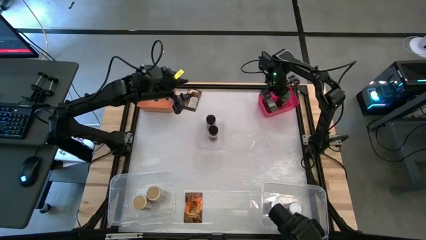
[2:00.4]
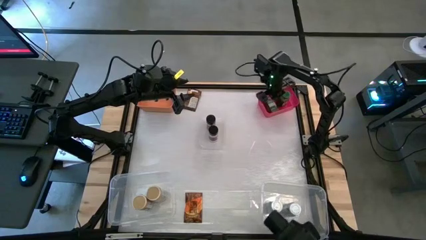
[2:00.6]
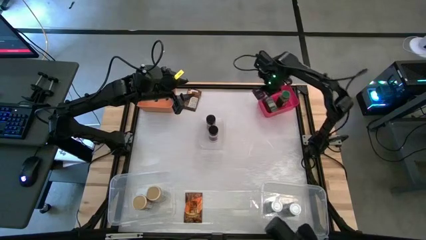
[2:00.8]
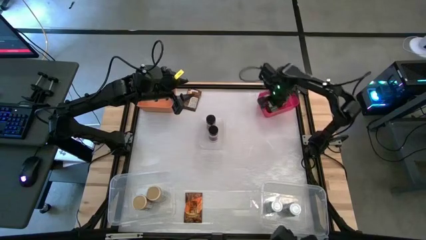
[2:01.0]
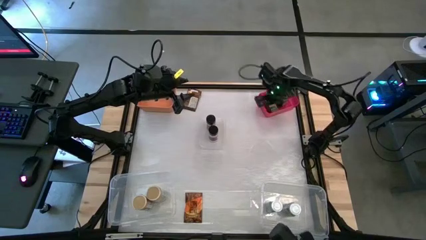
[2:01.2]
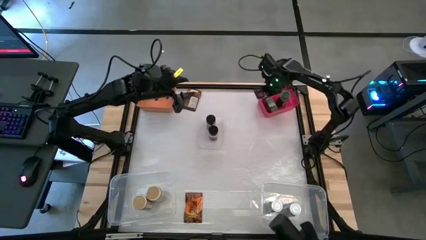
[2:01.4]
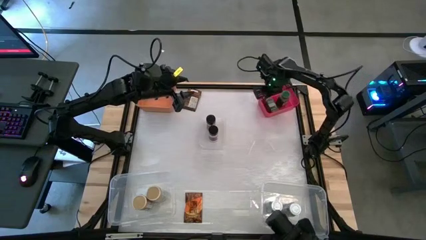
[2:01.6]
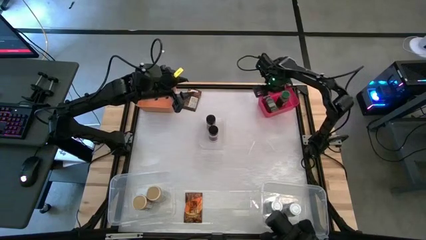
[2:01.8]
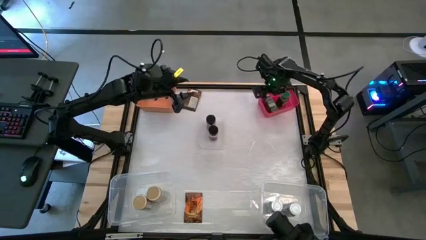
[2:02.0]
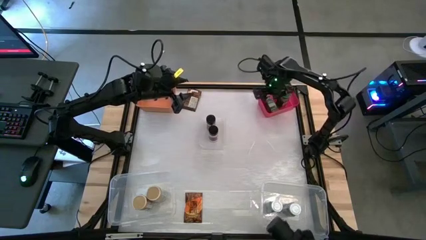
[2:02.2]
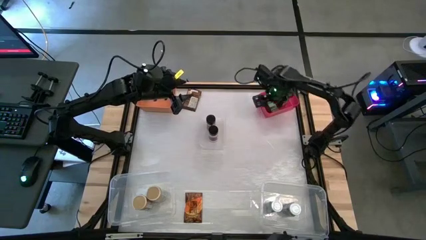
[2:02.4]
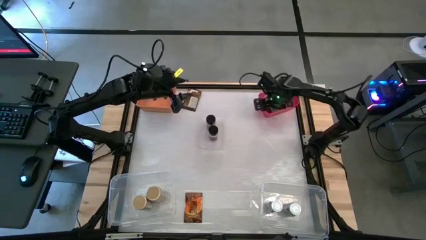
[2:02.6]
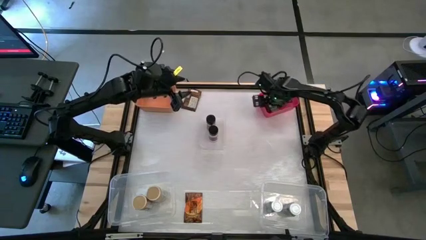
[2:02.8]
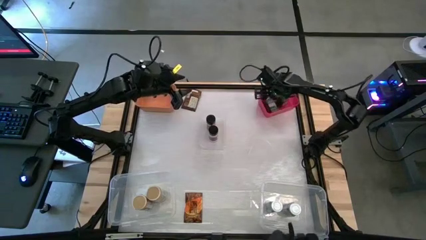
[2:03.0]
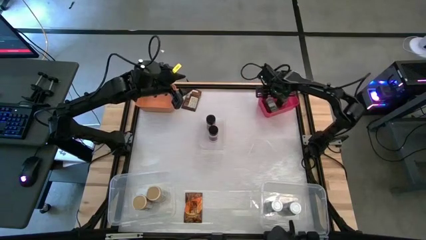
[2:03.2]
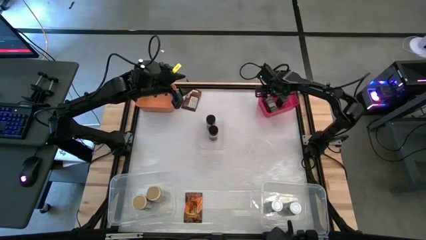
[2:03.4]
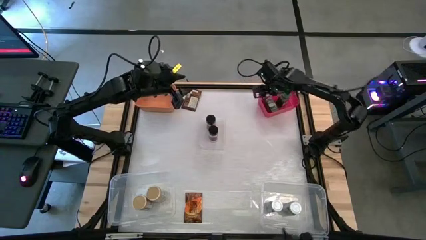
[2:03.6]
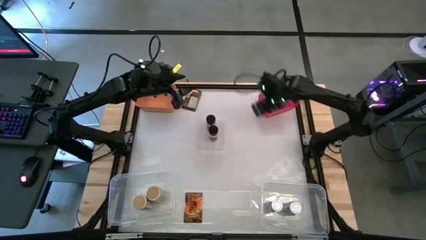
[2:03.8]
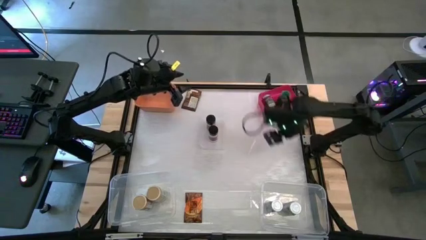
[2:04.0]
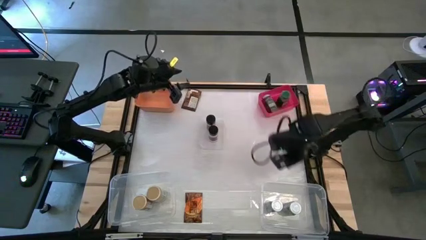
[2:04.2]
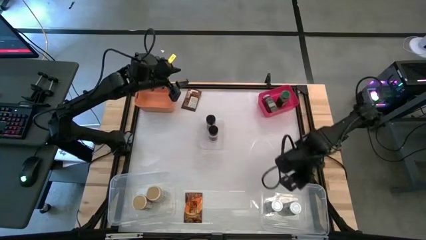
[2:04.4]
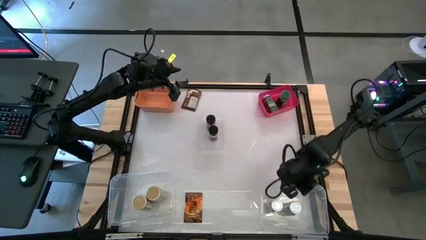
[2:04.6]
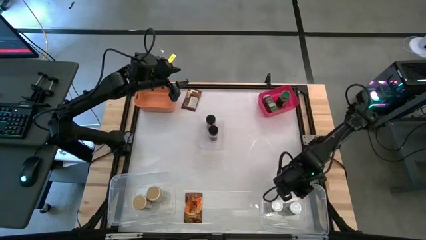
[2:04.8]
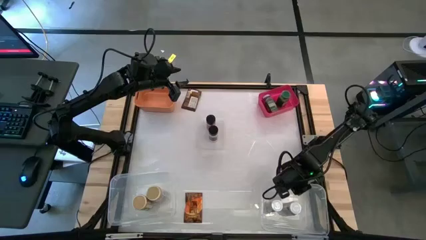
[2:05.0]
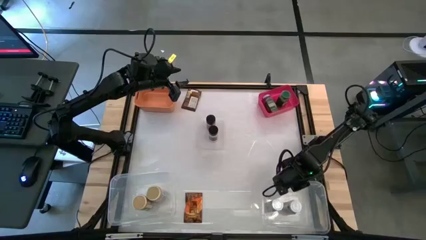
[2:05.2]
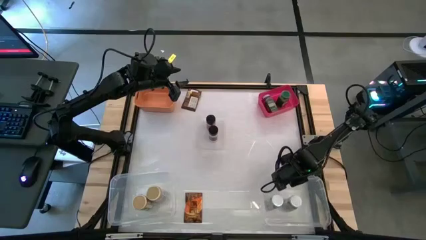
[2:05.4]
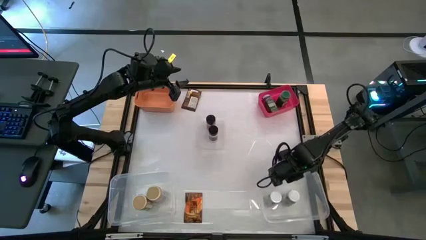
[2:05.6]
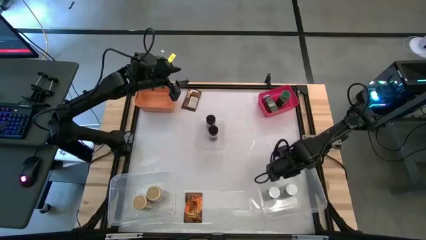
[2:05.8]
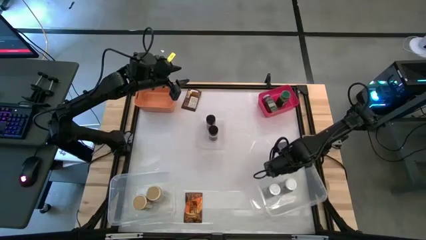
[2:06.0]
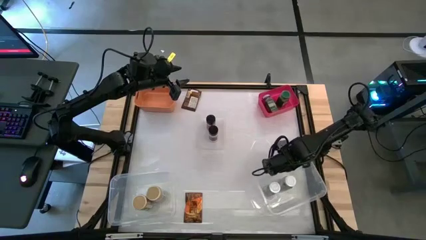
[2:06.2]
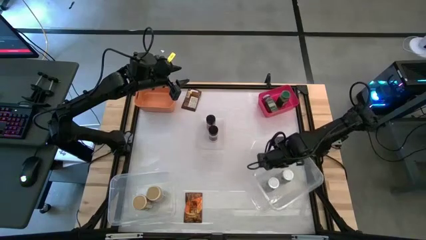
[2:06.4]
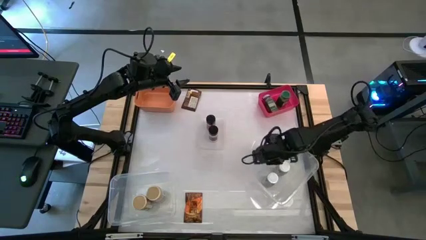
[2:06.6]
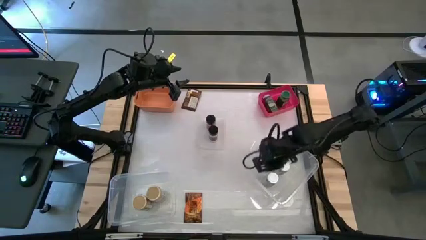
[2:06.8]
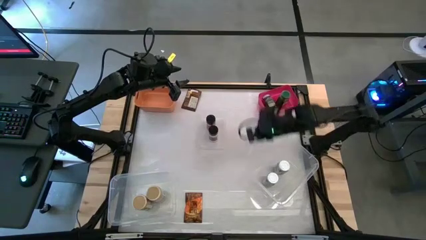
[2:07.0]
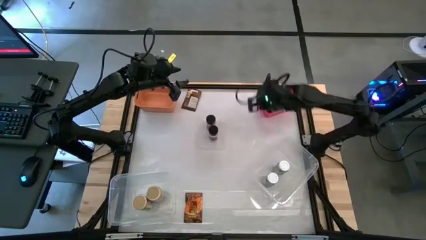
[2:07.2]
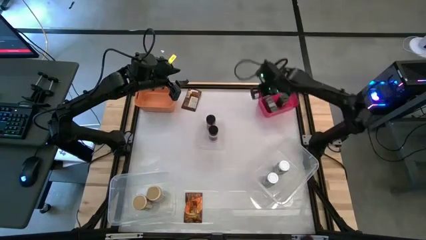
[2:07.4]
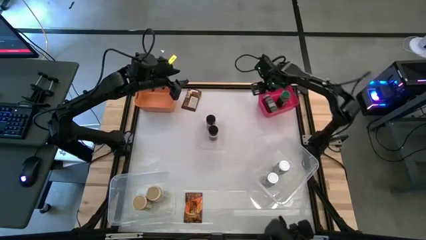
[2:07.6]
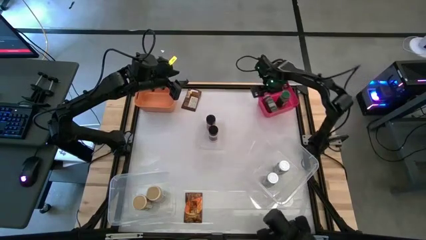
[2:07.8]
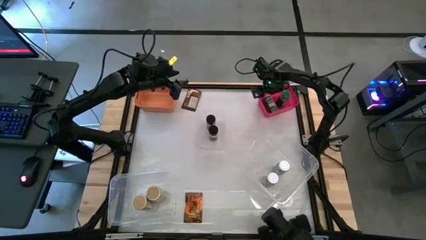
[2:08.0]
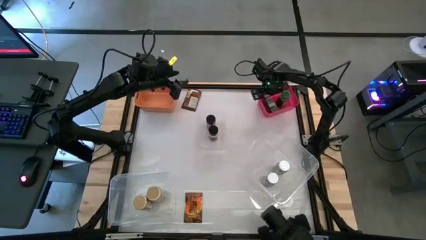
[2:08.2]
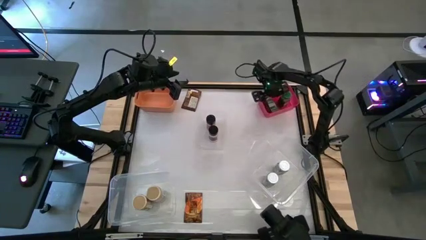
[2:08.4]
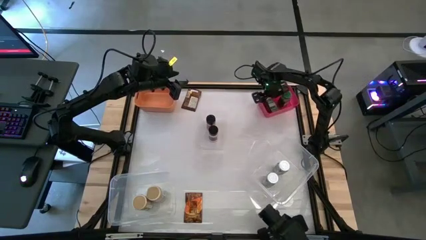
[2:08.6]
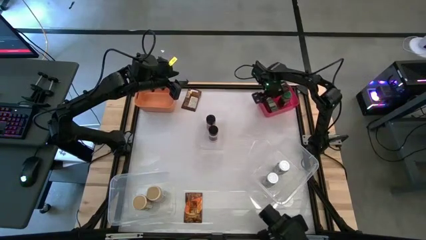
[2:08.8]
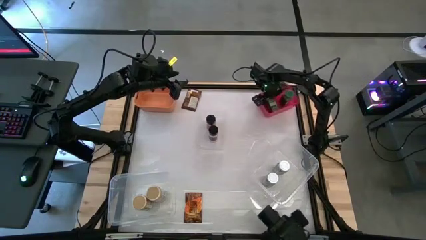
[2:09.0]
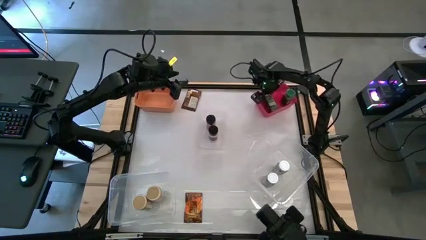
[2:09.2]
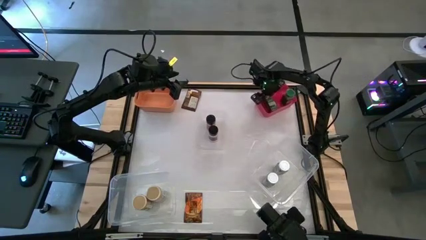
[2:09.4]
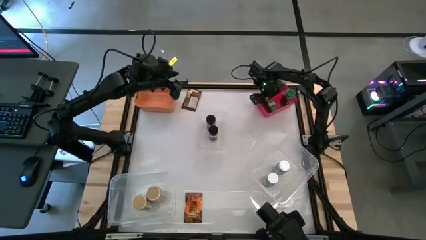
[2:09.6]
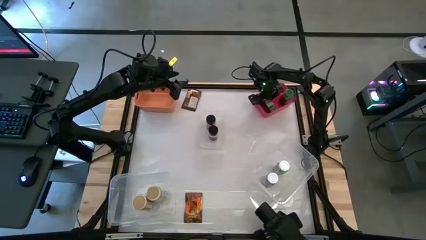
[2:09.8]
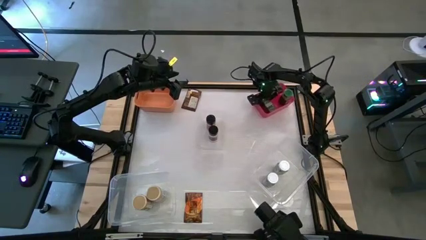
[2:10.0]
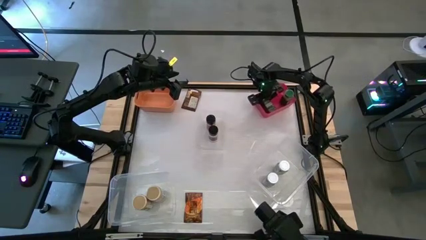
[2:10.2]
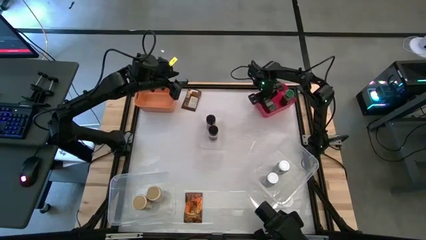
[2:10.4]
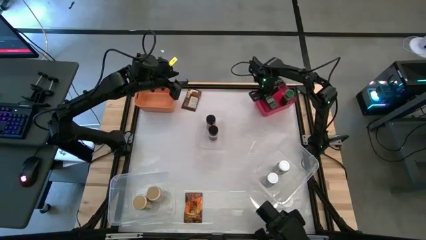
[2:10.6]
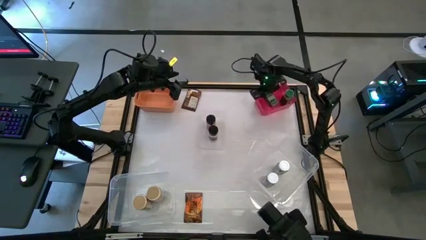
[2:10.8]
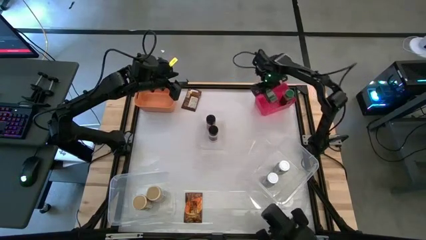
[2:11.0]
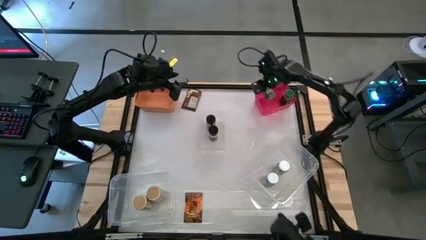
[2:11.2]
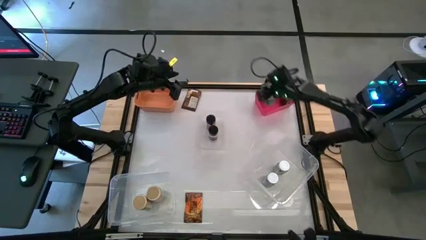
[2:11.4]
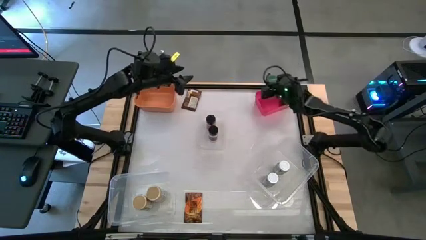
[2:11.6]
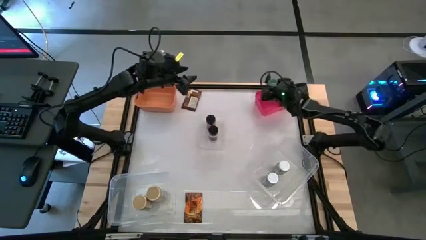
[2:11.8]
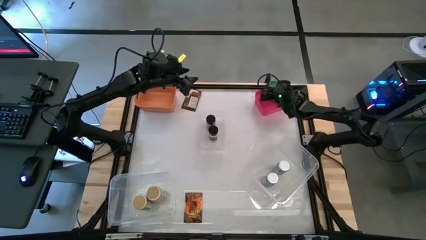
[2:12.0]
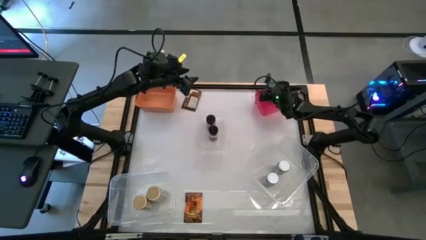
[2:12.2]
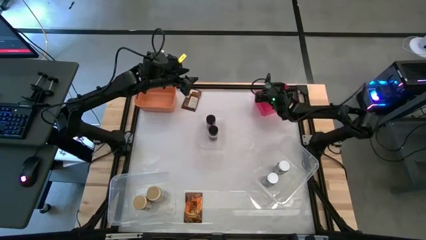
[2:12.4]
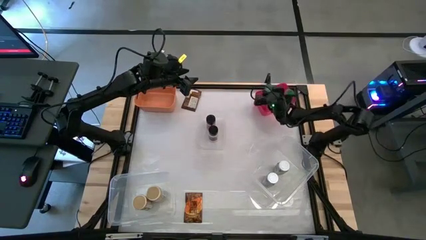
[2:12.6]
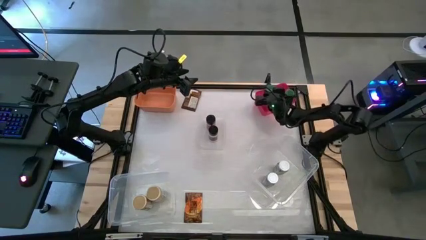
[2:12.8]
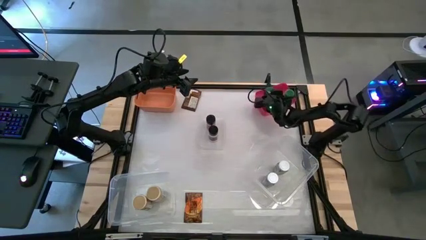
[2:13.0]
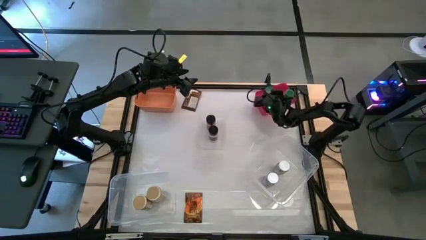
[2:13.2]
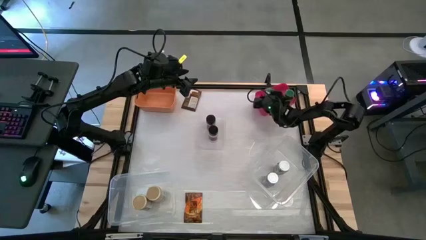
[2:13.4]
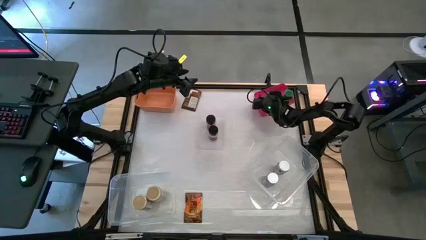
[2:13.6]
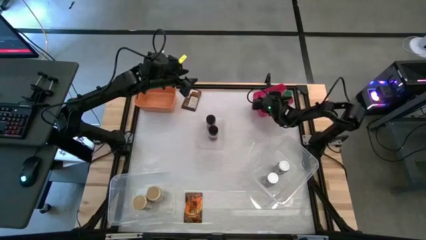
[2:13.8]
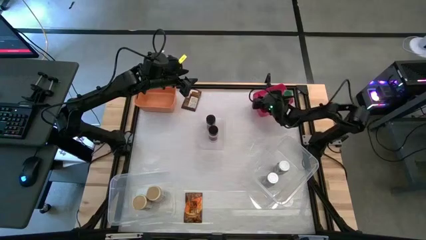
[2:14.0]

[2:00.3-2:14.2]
Task: Sort spices by type
Put the green seasoning bottle into the pink bin

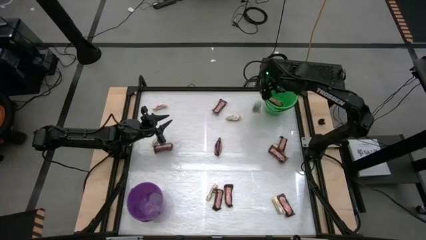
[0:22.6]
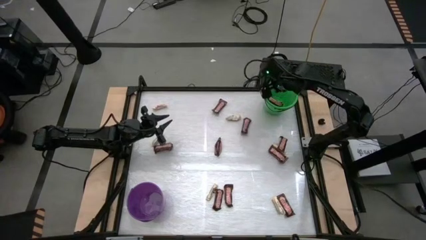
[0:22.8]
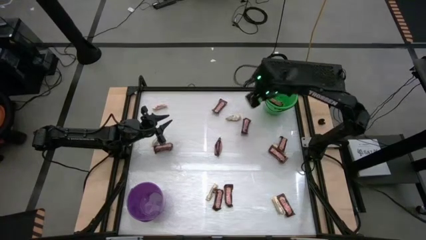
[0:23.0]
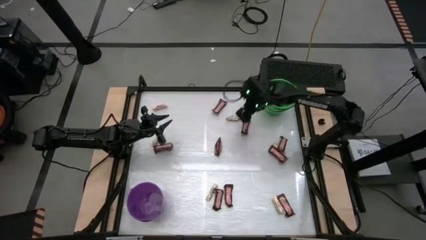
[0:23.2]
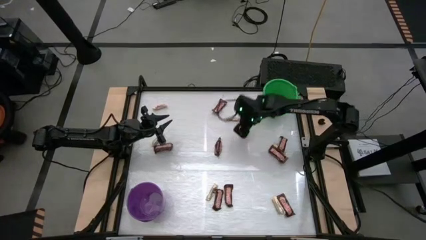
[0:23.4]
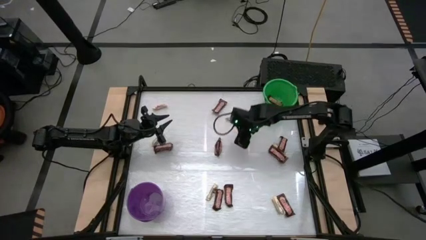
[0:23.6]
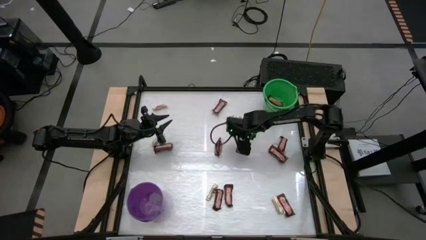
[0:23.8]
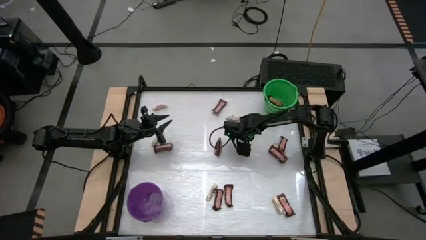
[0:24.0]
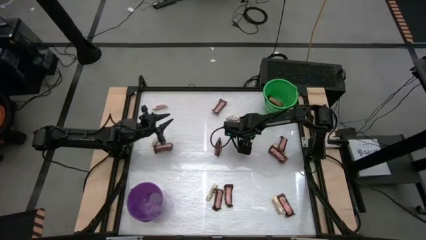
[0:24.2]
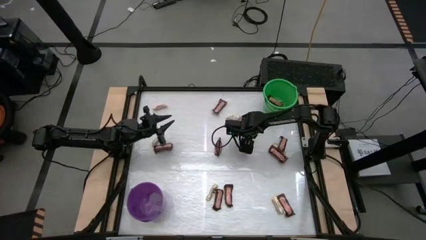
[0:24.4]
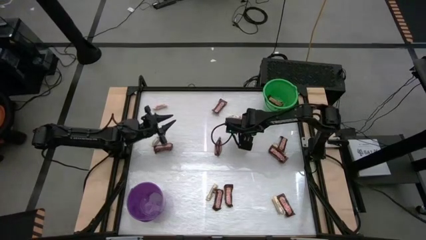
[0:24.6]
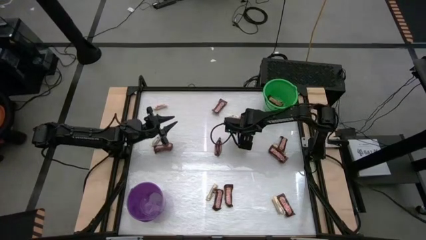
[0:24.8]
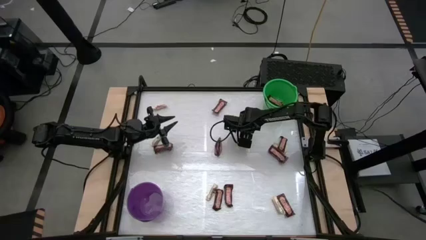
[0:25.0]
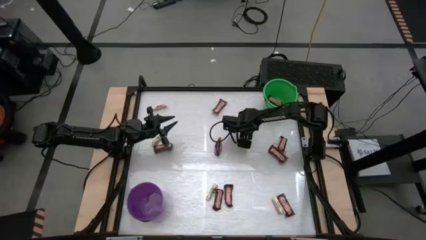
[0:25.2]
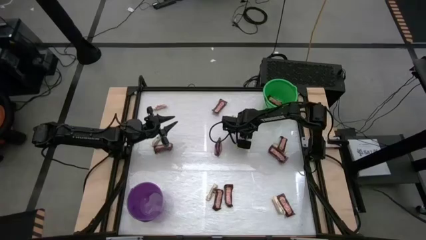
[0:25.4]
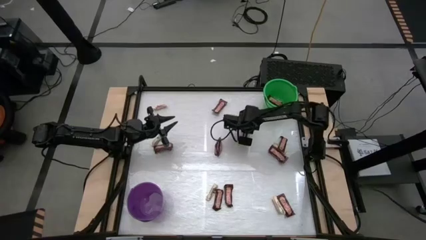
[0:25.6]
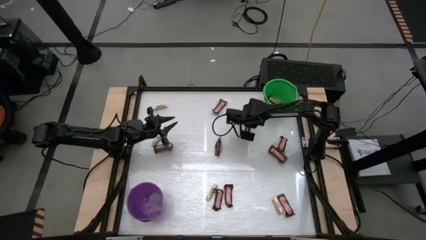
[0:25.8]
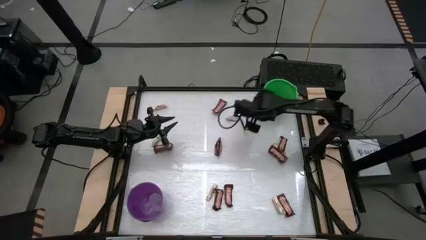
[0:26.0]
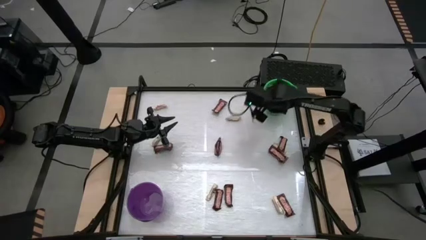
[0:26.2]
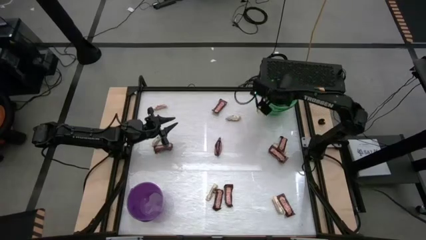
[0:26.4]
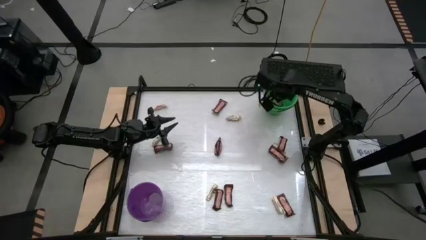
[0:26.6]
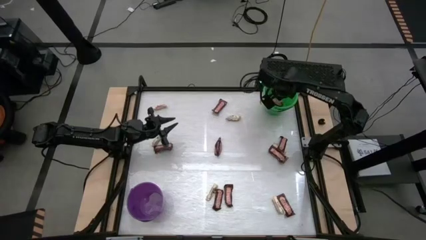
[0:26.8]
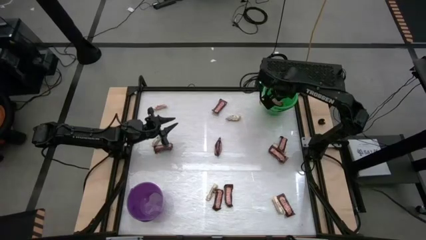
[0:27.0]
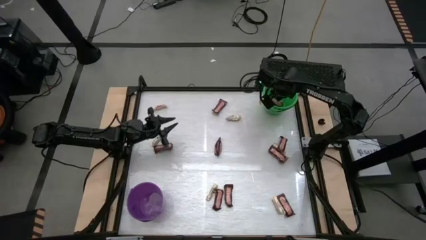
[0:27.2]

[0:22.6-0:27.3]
Task: Sort candy by brand, put in halloween buckets
Put the brown candy bar into the green bucket
